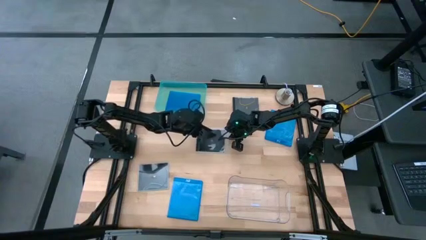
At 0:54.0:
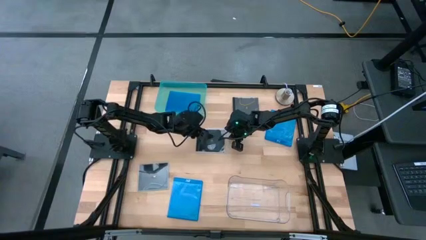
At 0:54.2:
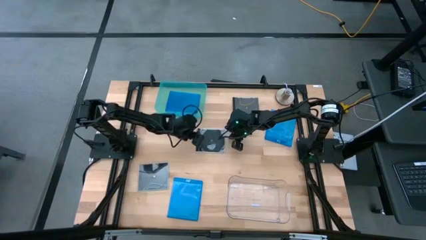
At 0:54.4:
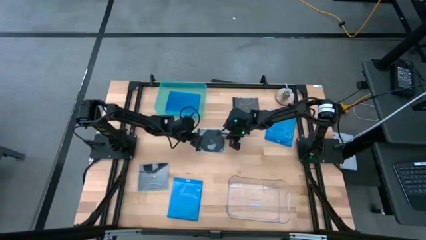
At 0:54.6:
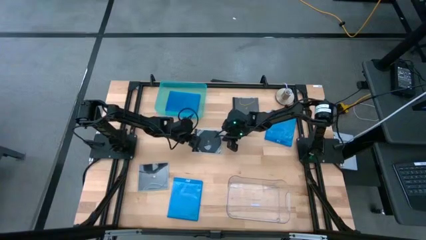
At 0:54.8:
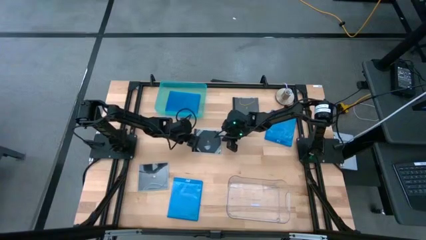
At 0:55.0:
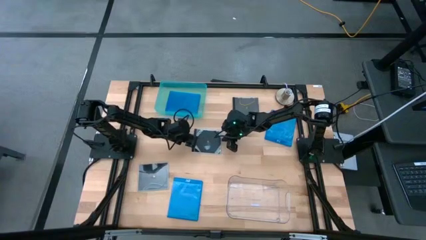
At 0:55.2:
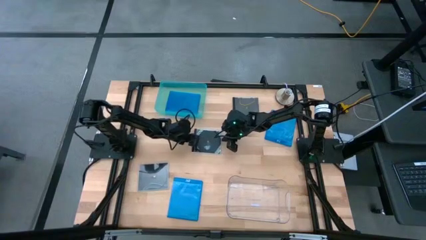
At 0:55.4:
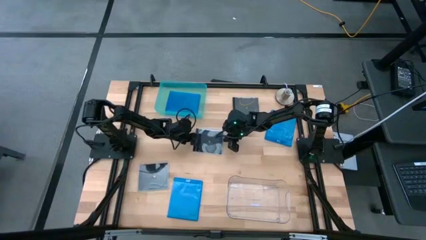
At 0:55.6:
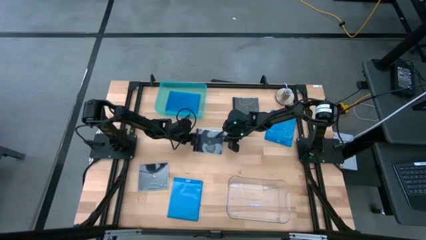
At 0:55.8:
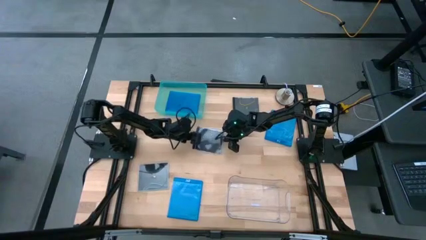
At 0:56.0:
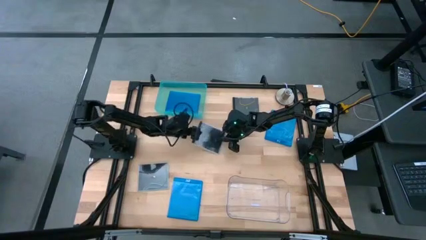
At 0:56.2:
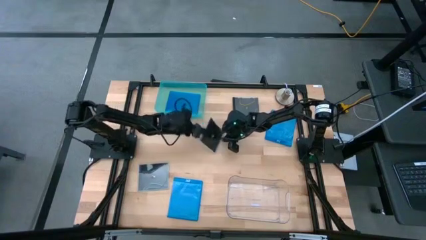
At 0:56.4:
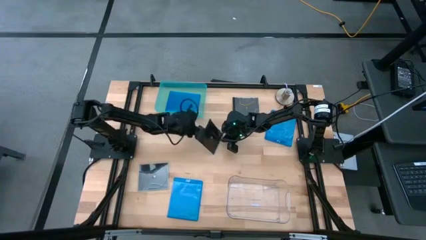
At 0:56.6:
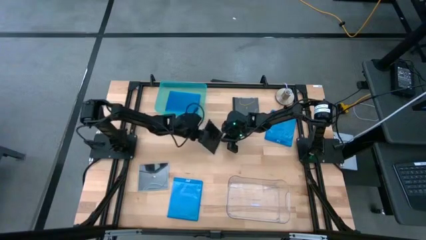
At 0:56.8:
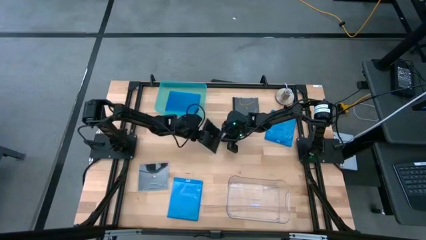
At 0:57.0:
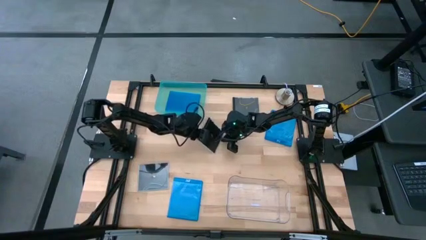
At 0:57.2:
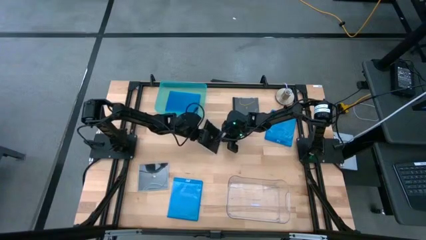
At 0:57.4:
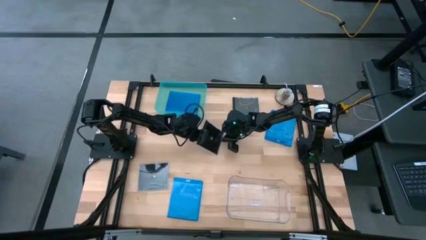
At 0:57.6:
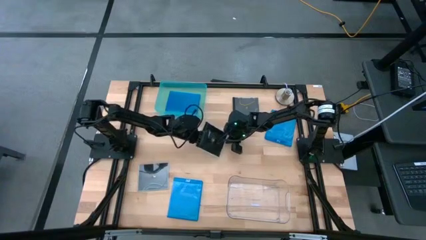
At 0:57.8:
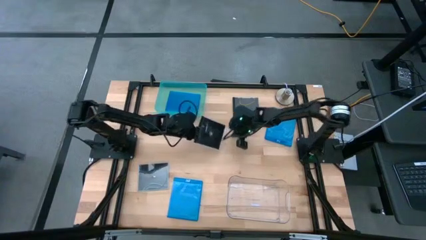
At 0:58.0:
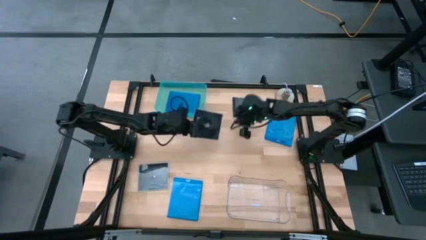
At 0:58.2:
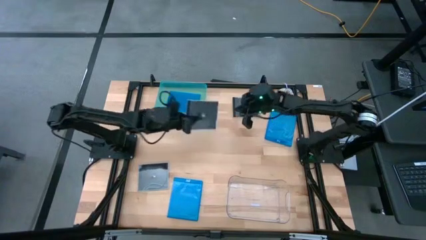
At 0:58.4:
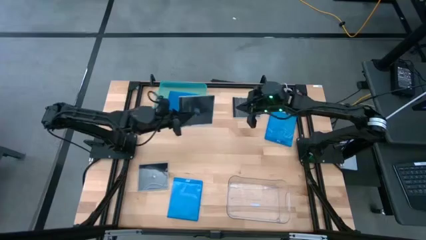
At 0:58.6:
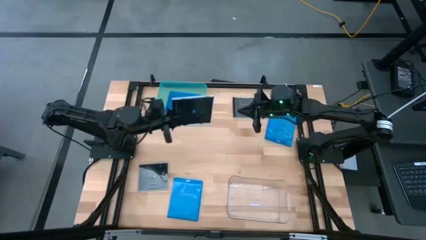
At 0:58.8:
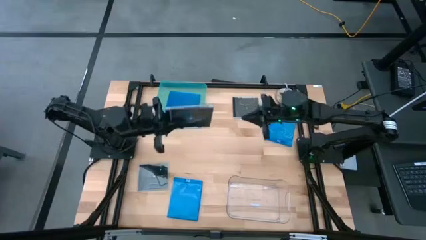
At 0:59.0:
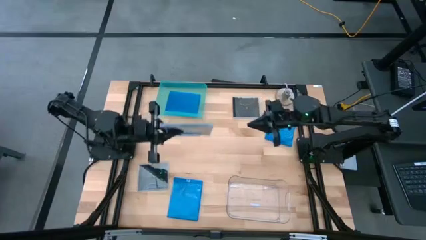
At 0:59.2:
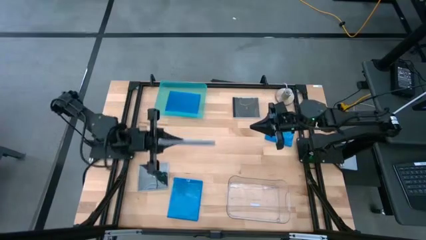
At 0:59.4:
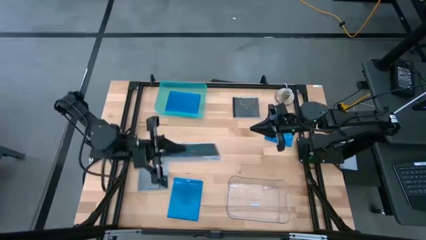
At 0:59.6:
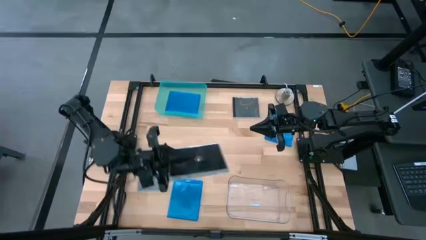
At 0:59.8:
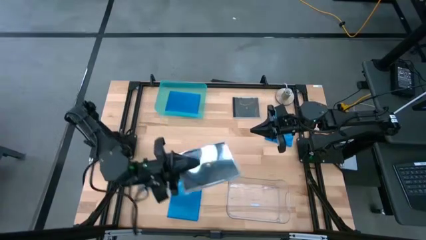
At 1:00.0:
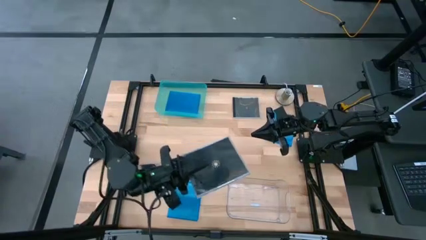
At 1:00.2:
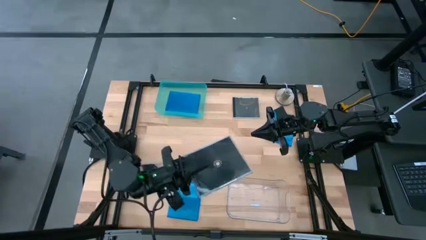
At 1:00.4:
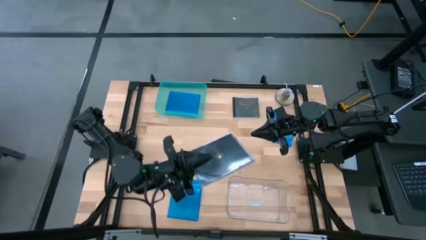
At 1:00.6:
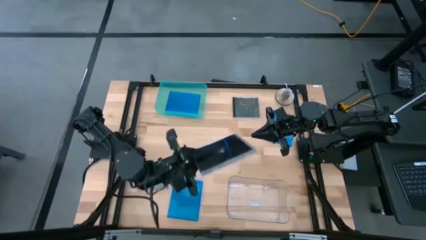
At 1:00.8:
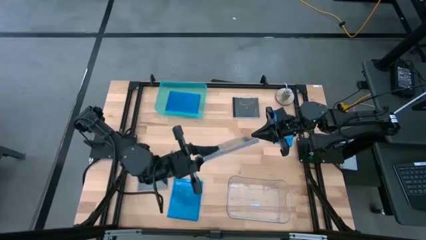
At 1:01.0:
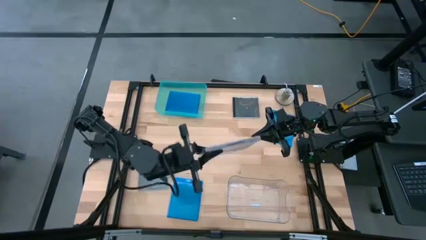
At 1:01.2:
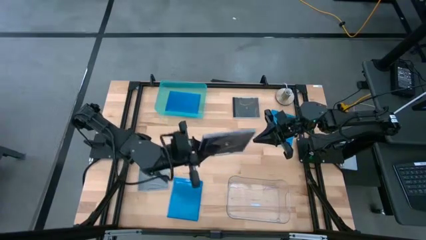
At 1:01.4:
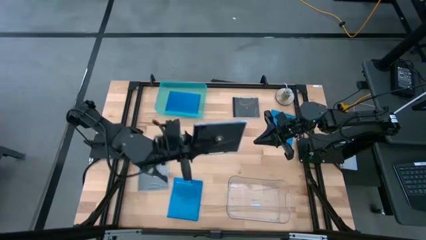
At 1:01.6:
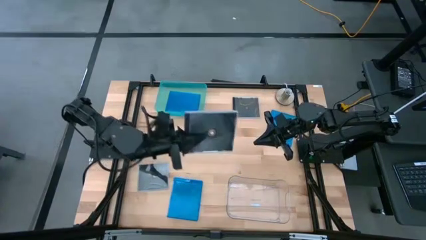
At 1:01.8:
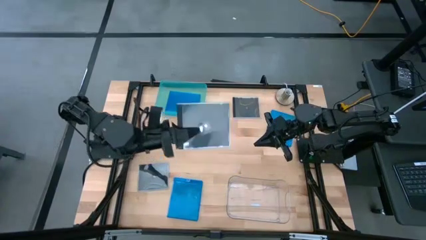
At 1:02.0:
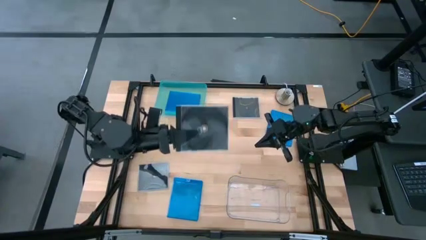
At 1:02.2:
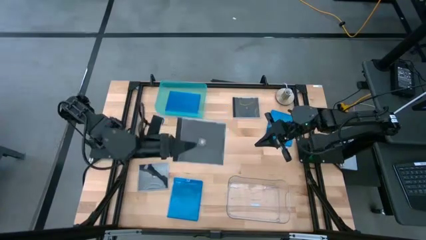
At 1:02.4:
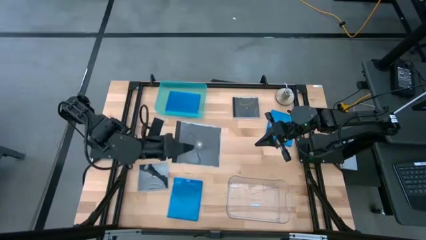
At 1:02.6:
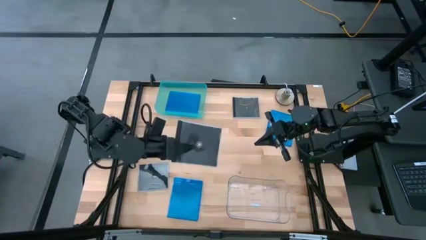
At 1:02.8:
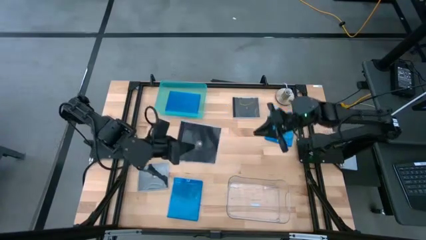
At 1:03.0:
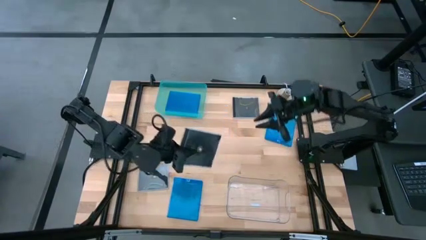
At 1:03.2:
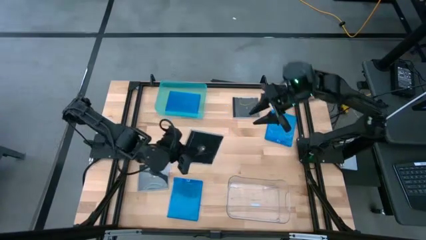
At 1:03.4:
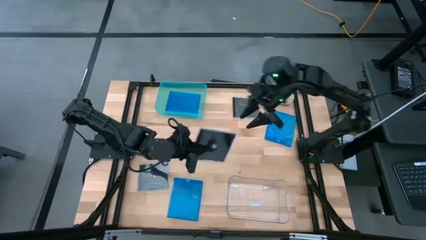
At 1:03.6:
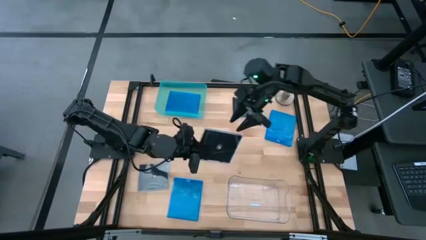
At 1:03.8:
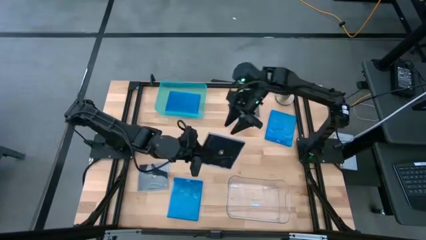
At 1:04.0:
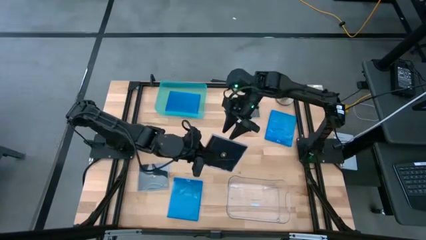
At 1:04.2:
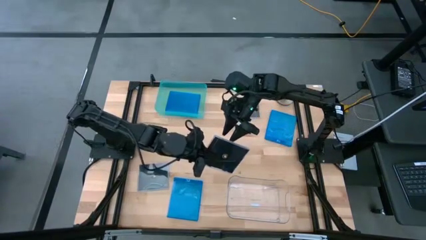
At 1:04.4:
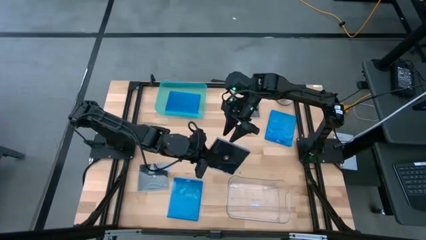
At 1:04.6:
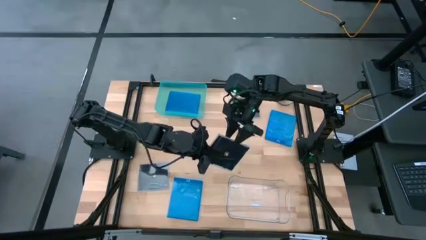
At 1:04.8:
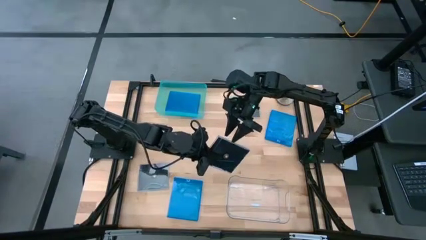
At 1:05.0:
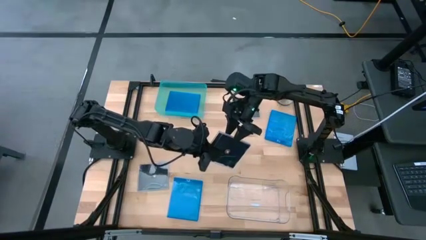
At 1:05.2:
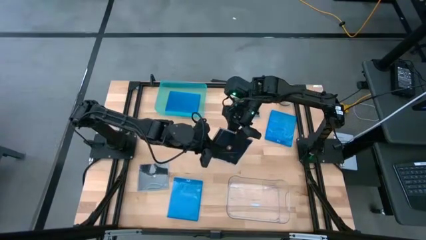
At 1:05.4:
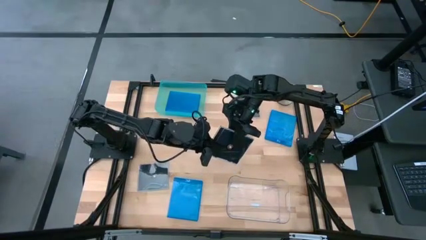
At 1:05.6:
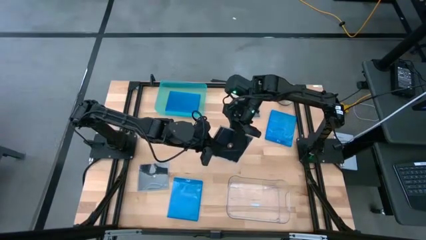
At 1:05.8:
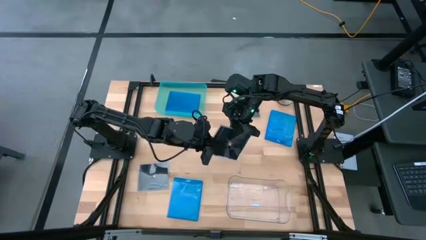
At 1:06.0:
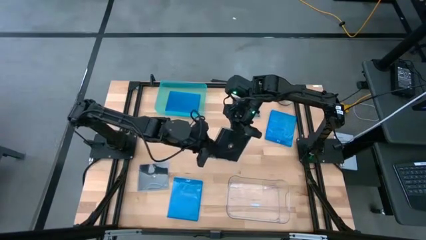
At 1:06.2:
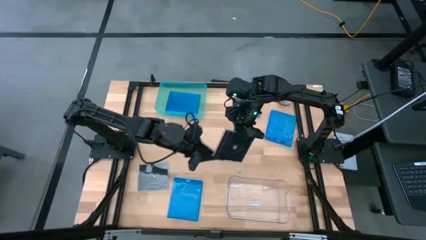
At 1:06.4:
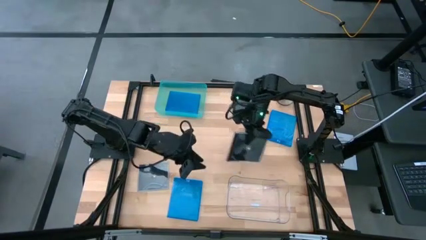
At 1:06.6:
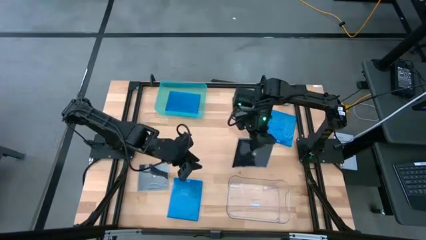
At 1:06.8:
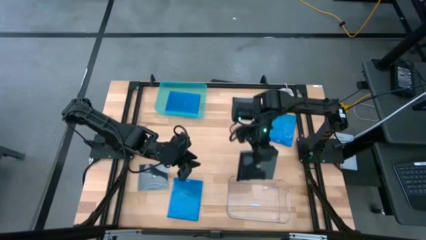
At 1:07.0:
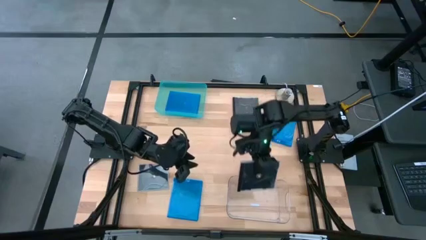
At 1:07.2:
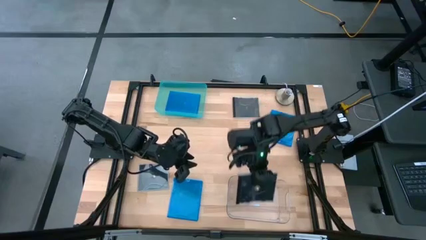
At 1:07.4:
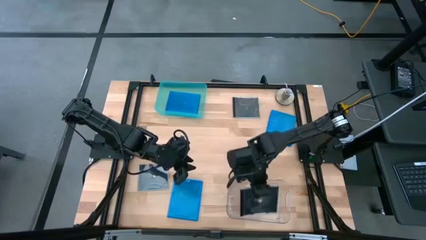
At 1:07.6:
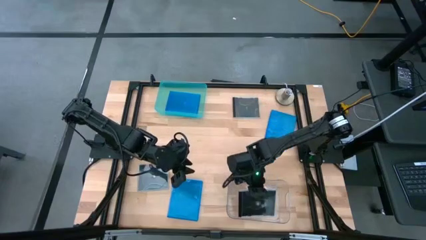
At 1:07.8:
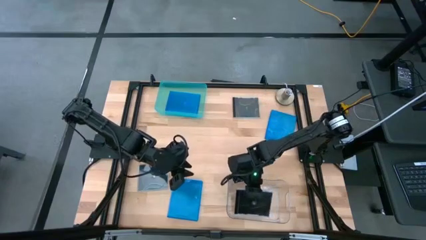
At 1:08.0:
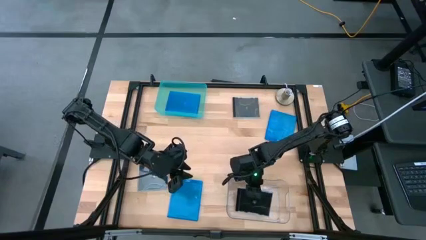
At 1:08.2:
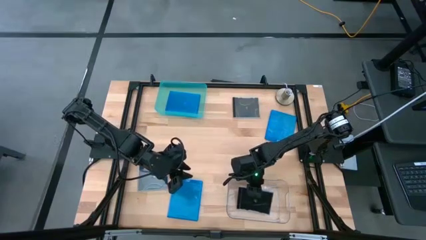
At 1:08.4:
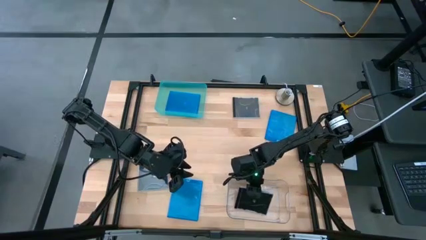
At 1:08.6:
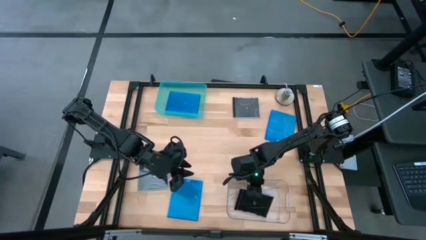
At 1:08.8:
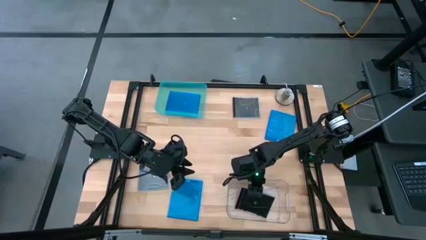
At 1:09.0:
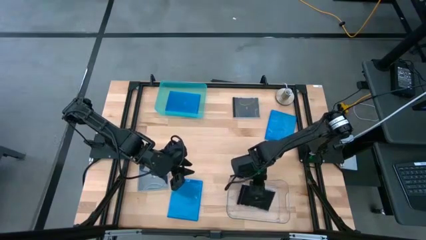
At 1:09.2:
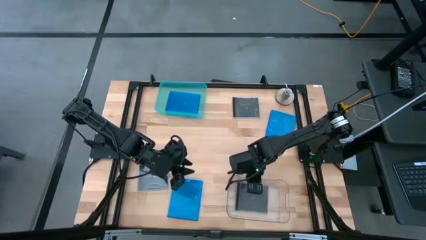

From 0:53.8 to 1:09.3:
Task: Pick & place jewel cases by type
Put the middle black CD case into the transparent bin
